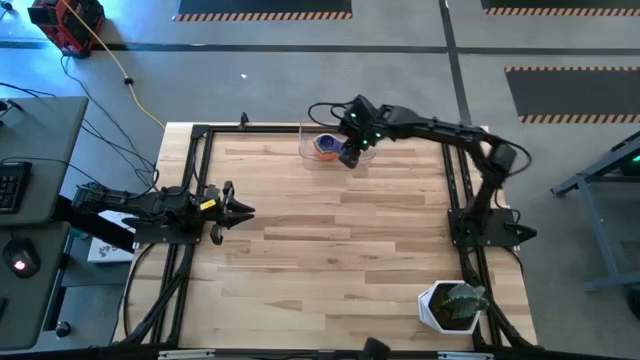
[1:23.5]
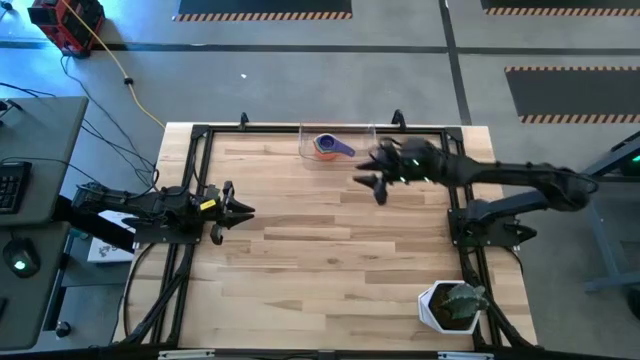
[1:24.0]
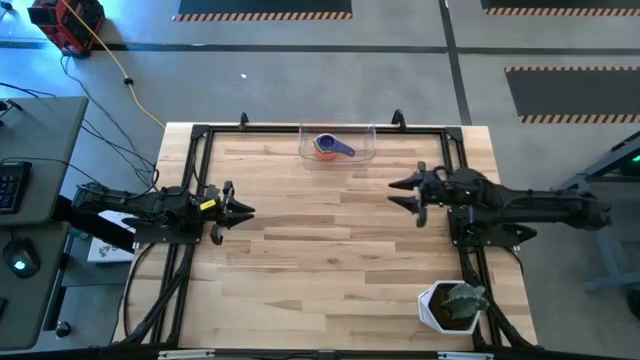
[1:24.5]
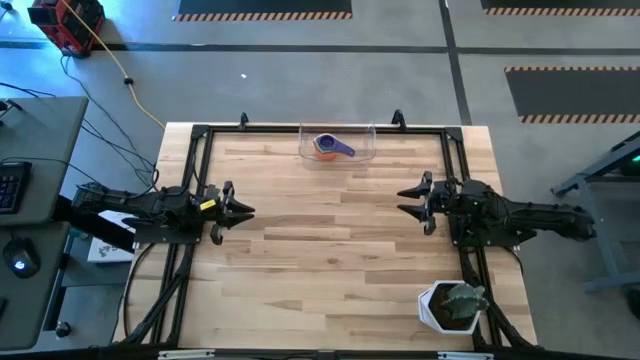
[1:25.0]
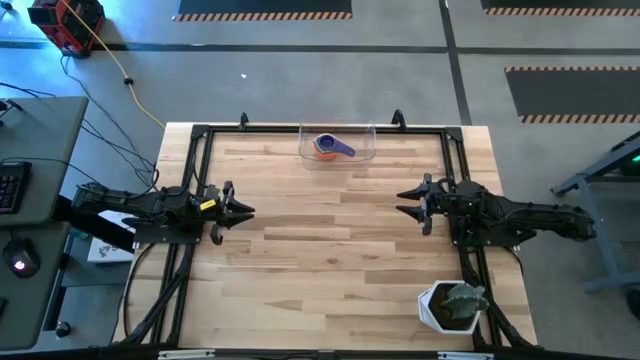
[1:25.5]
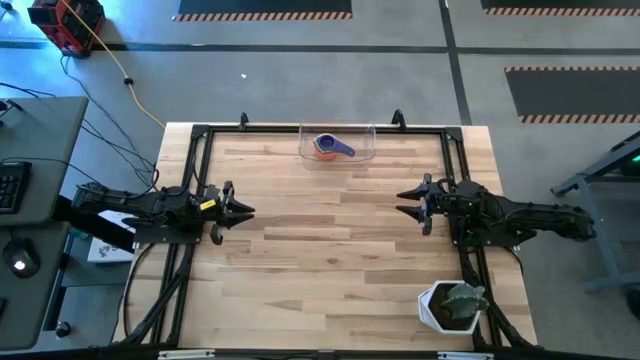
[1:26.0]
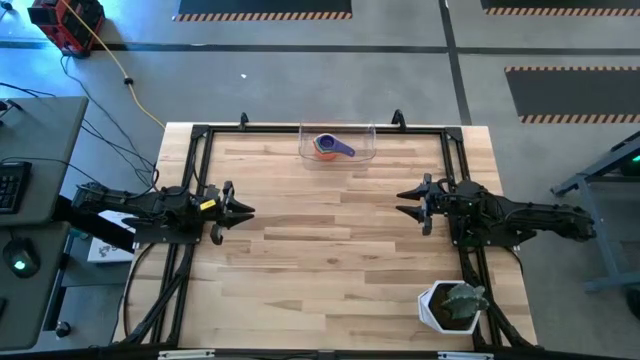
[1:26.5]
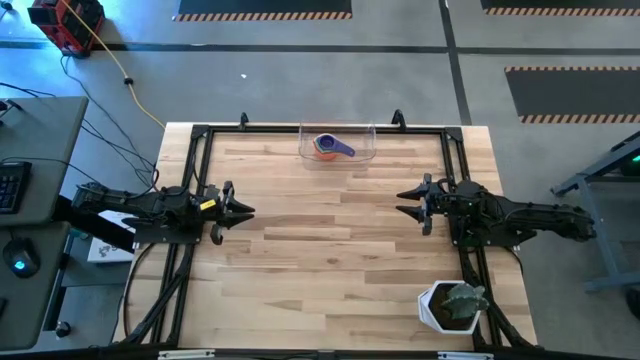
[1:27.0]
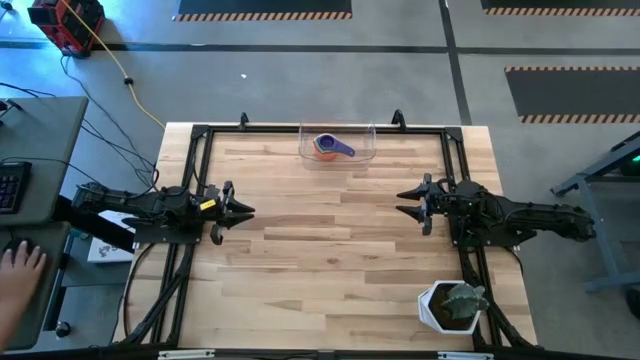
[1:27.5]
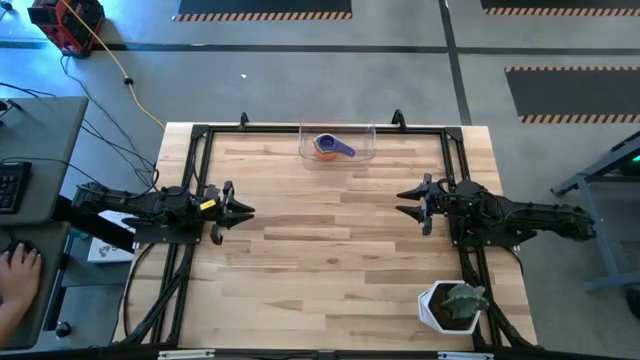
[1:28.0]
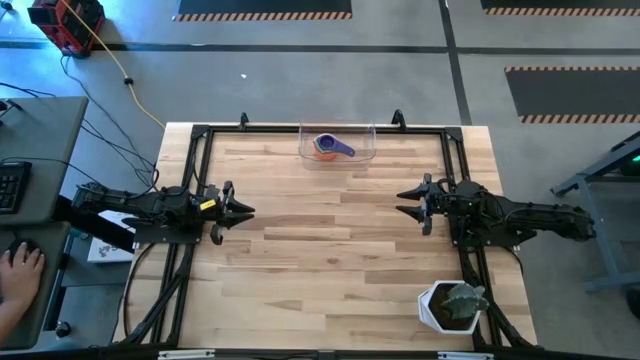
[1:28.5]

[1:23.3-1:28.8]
Task: Nest measuring cups in basket
Return to Home Position

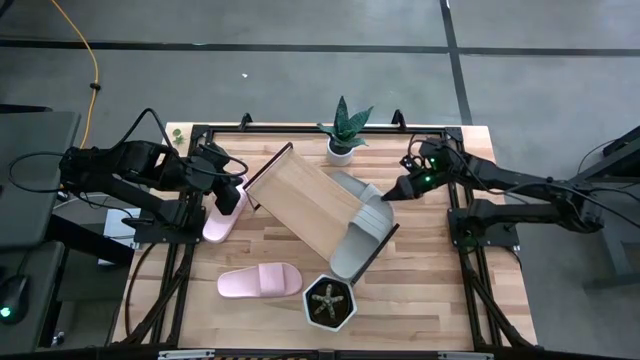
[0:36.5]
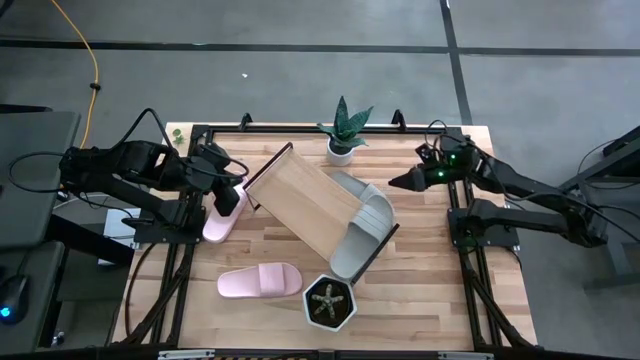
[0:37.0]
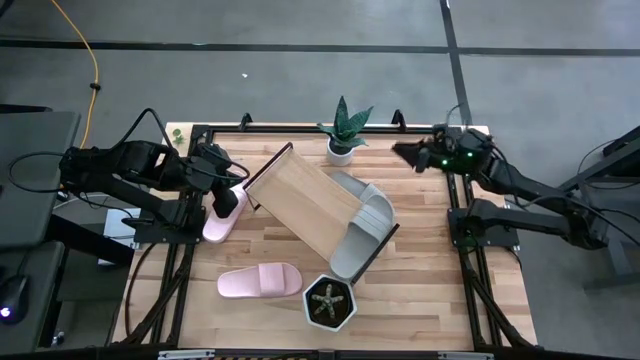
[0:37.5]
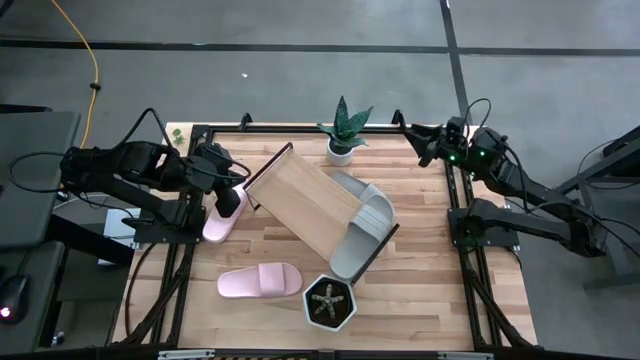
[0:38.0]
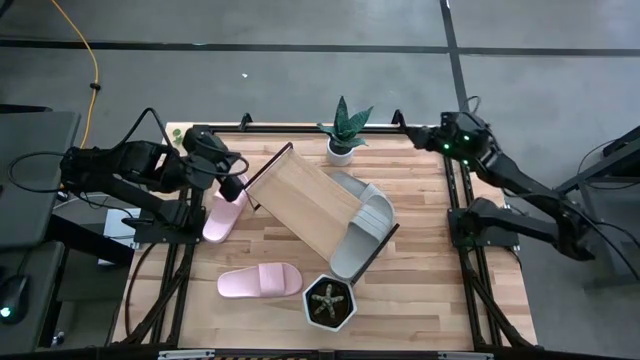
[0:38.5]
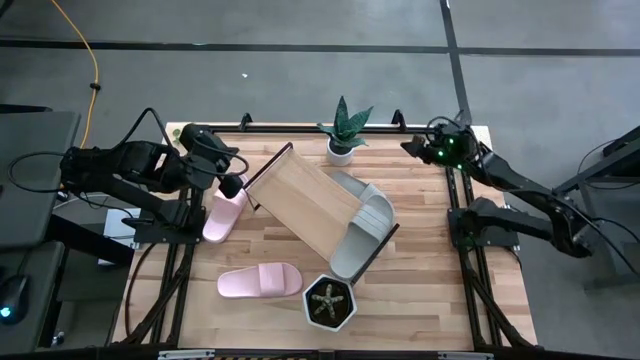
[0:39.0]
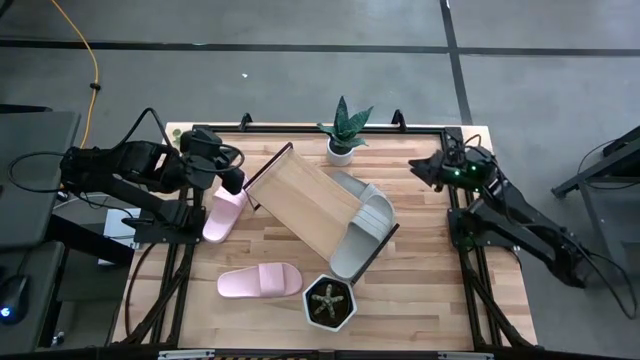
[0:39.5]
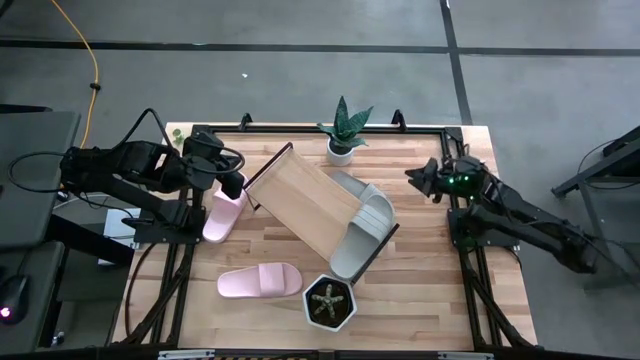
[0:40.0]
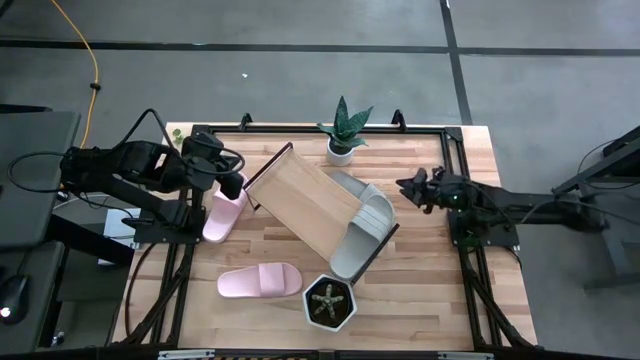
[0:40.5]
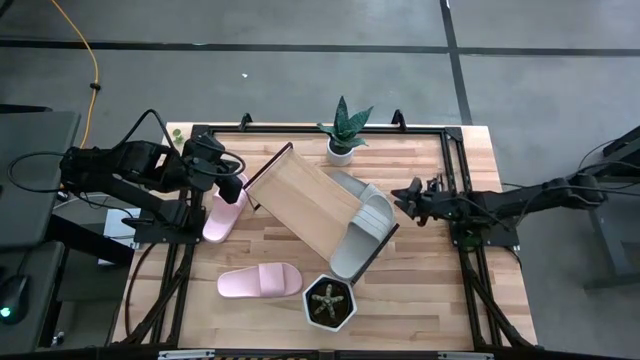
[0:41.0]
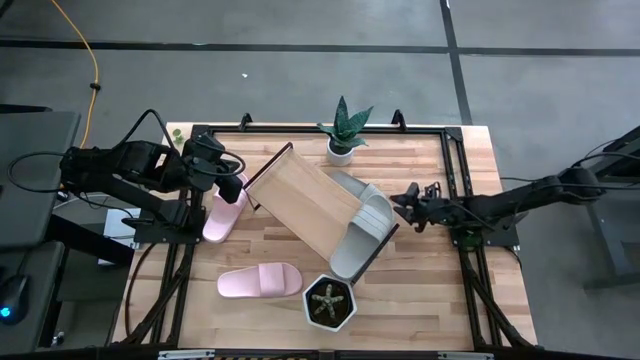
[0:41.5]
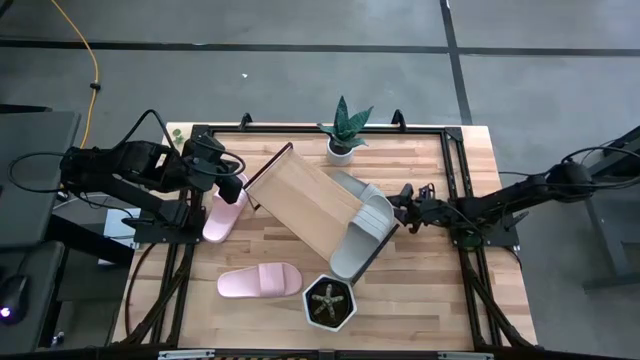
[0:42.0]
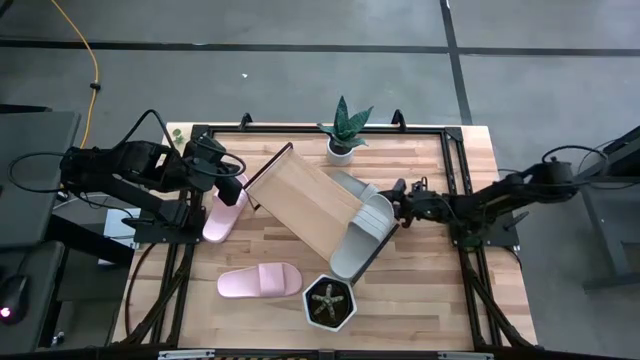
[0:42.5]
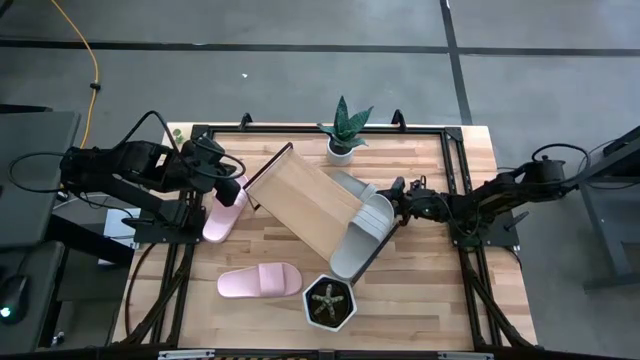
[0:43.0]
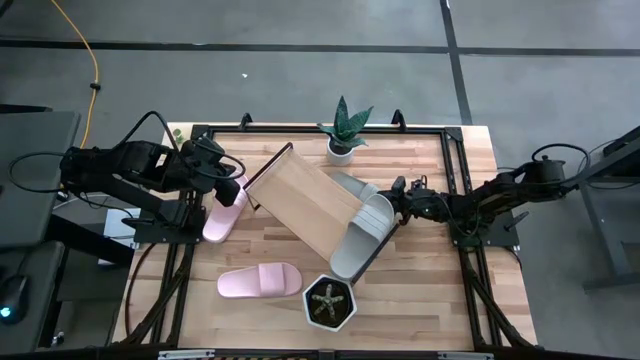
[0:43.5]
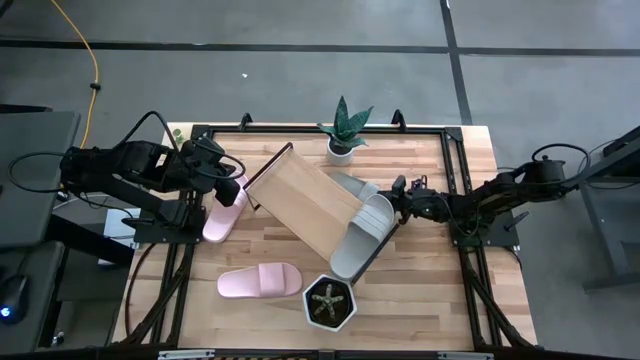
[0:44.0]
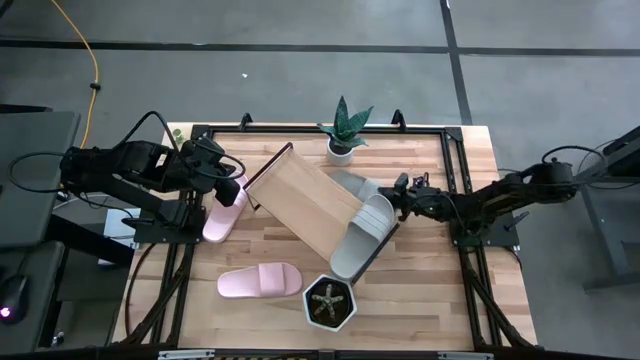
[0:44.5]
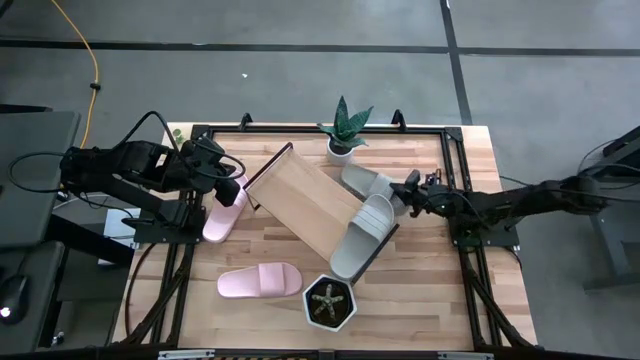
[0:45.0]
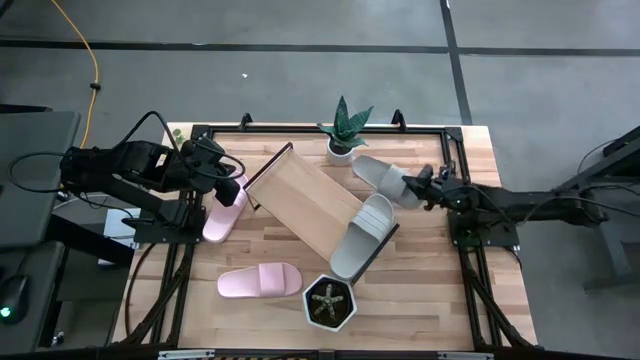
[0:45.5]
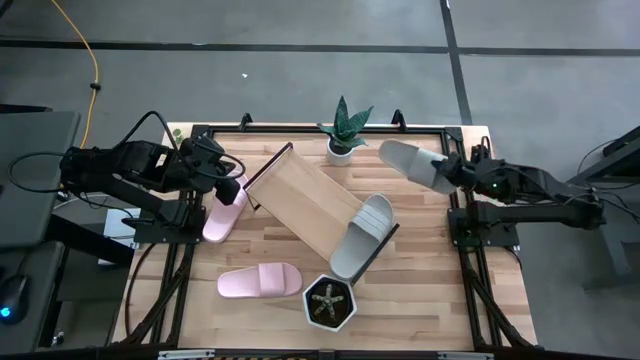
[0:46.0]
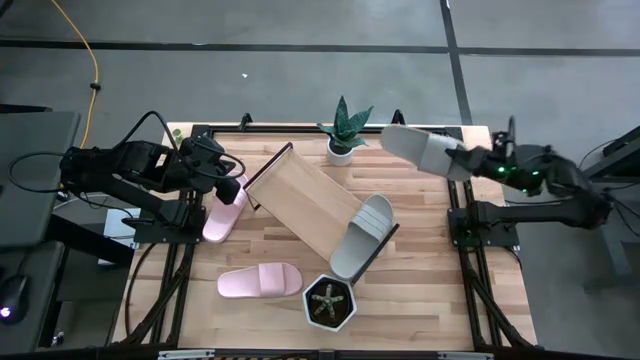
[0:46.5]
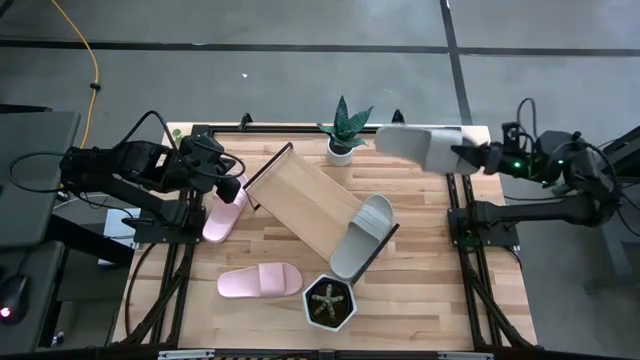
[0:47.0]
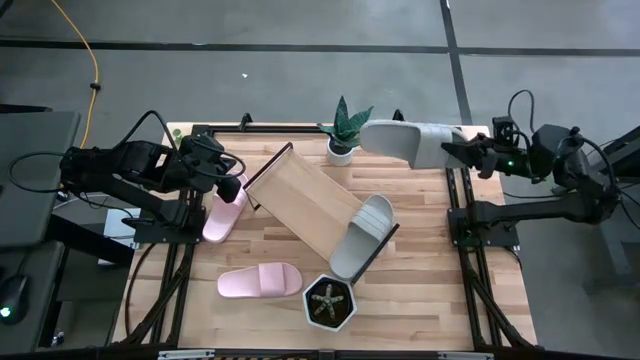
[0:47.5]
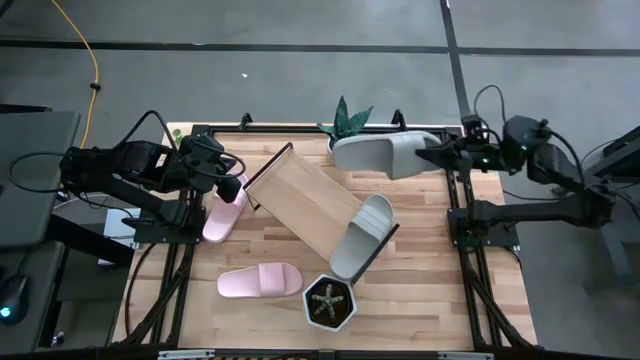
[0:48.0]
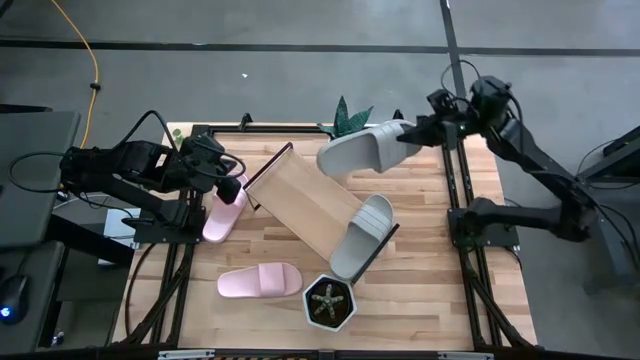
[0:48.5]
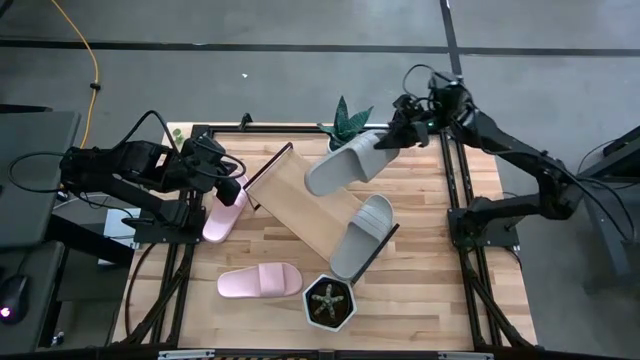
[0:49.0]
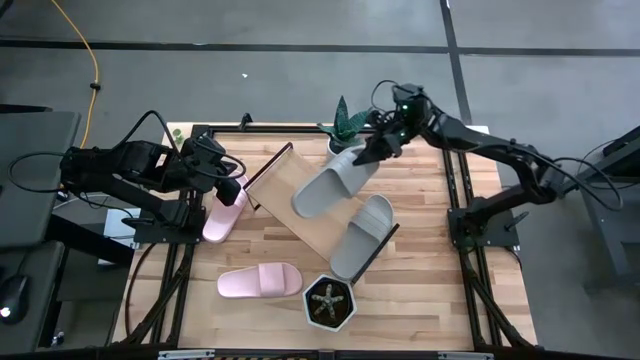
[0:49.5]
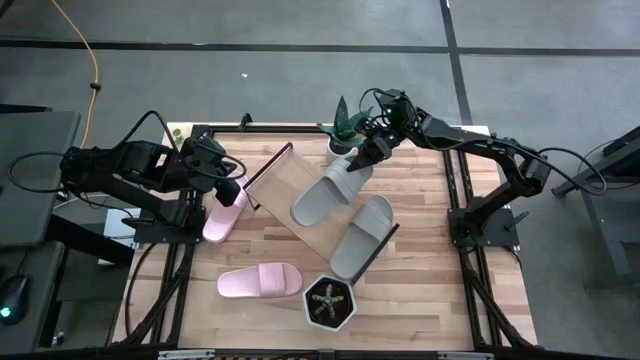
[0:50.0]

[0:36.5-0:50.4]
Task: Pick and place slides into the shelf
Put the gray slipper on the shelf
